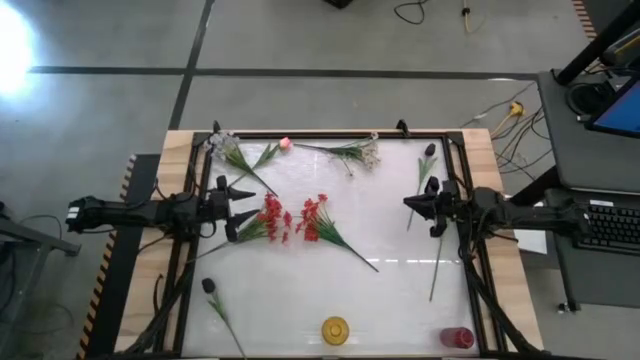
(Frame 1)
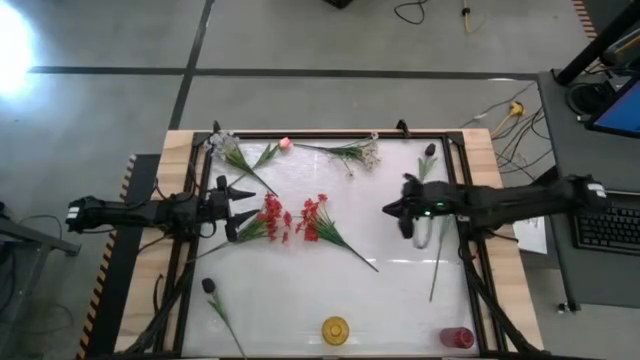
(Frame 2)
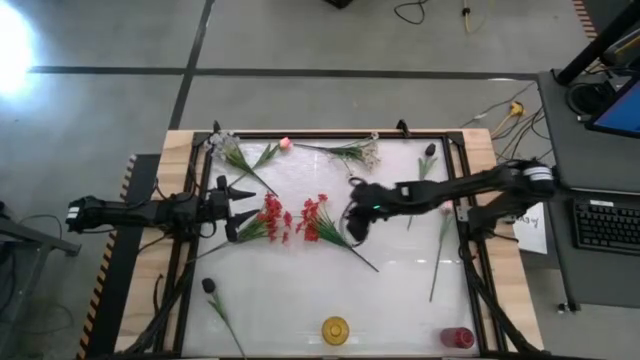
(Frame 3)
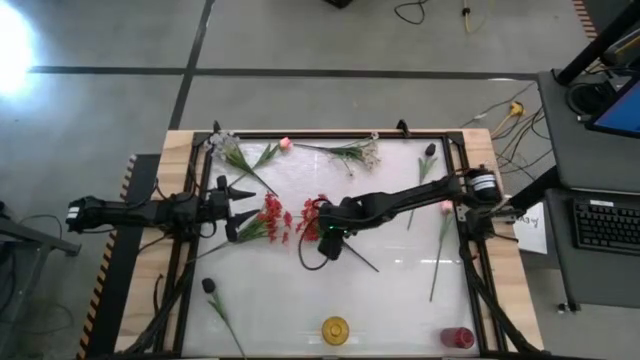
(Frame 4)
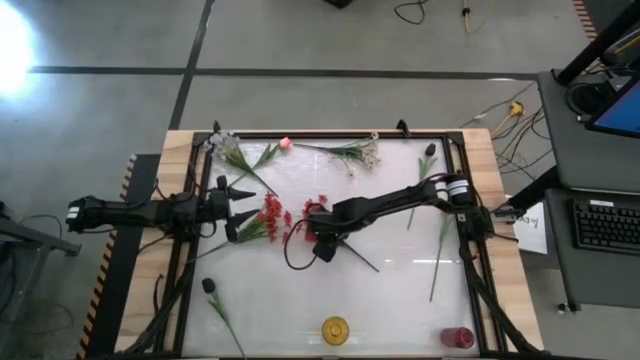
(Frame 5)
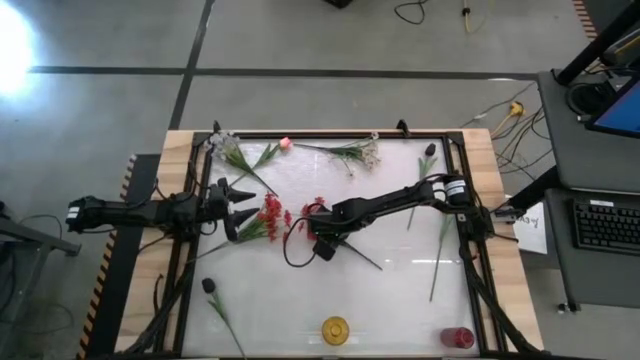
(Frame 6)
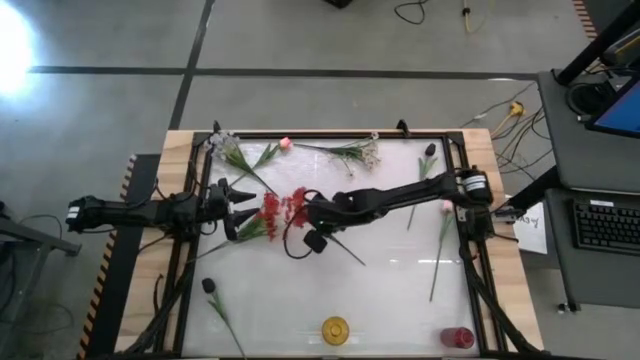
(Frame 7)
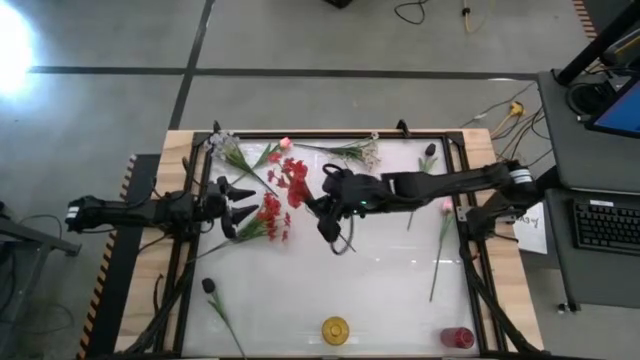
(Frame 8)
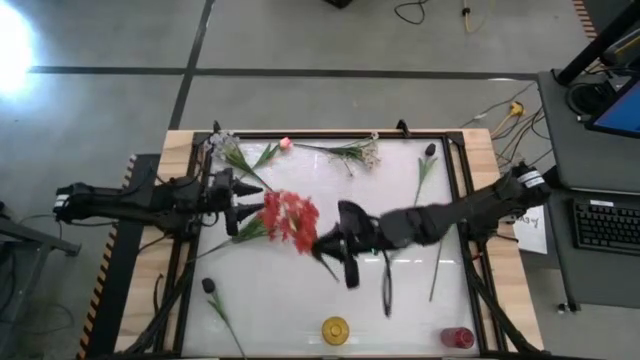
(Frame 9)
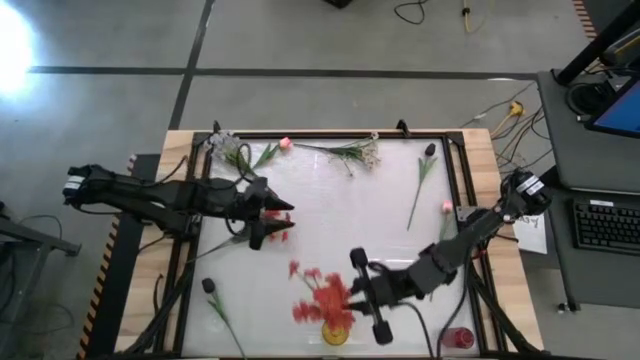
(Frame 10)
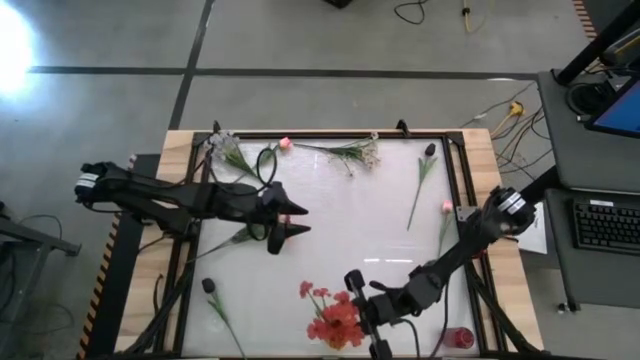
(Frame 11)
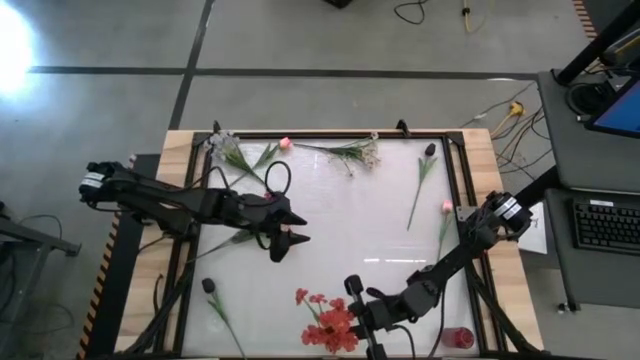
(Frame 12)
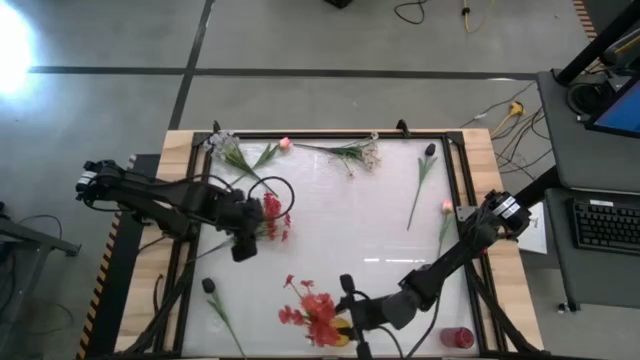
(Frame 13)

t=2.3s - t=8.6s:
Task: Sort flowers into vase by color
Put the right orange flowers into the yellow vase

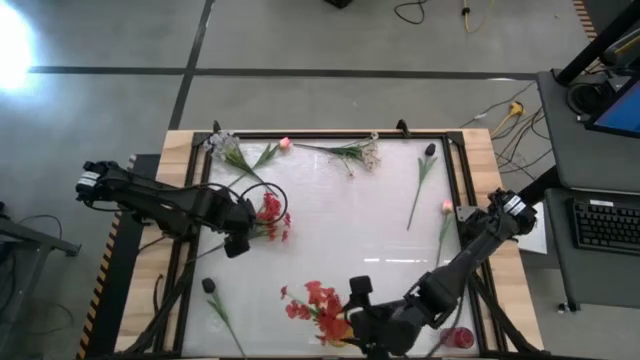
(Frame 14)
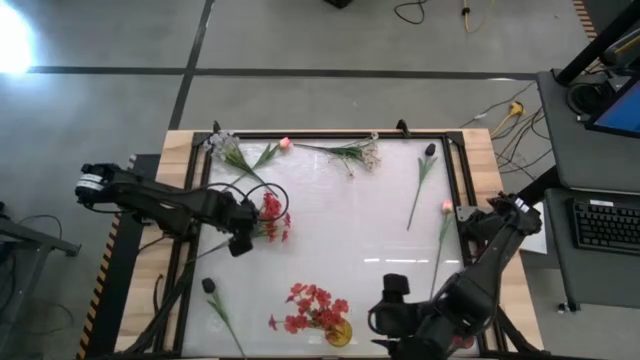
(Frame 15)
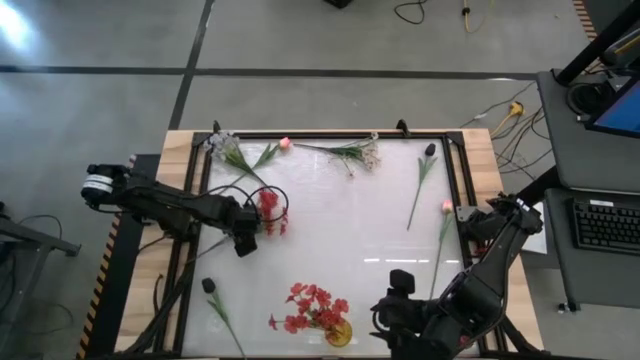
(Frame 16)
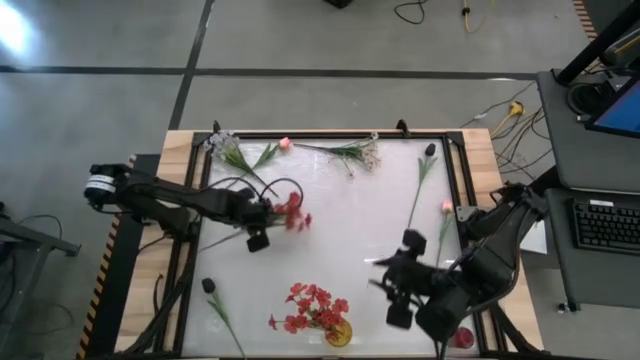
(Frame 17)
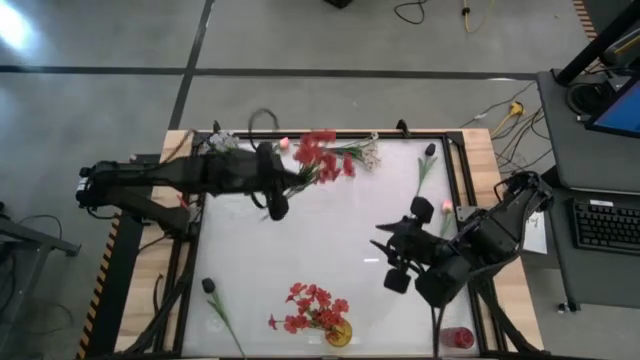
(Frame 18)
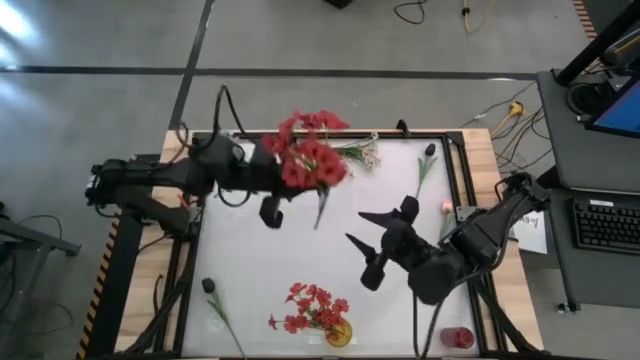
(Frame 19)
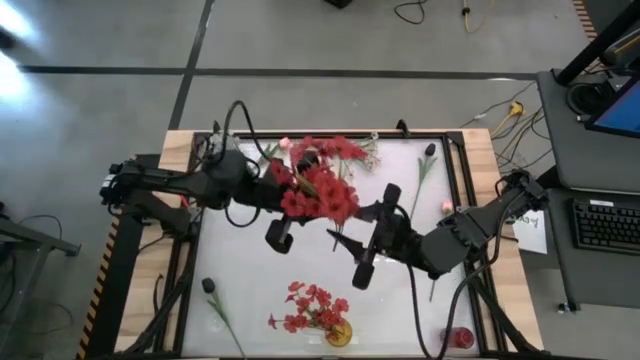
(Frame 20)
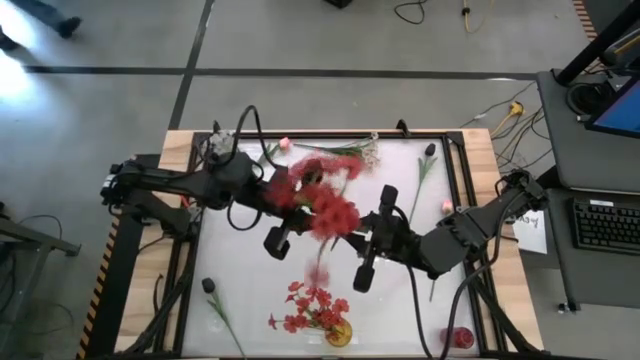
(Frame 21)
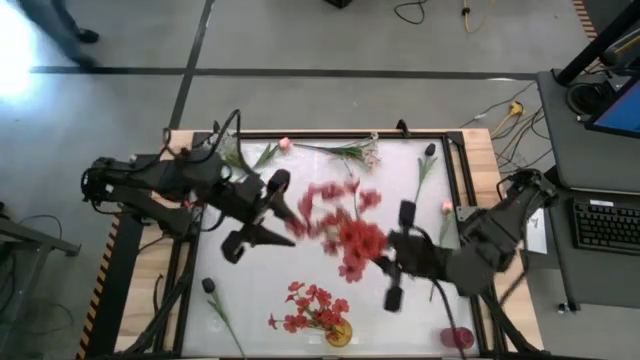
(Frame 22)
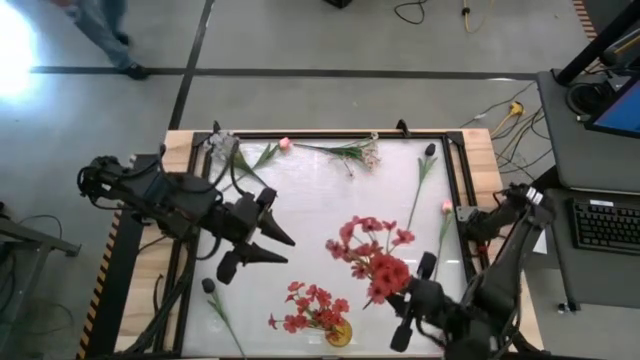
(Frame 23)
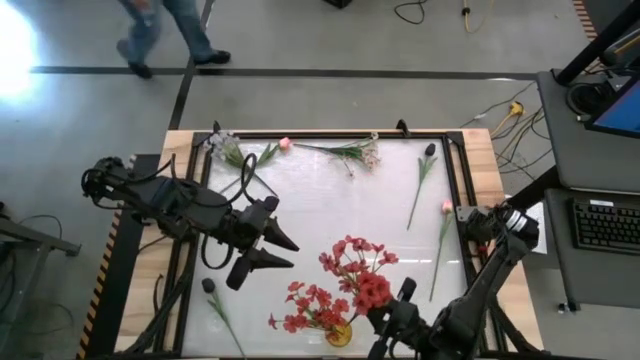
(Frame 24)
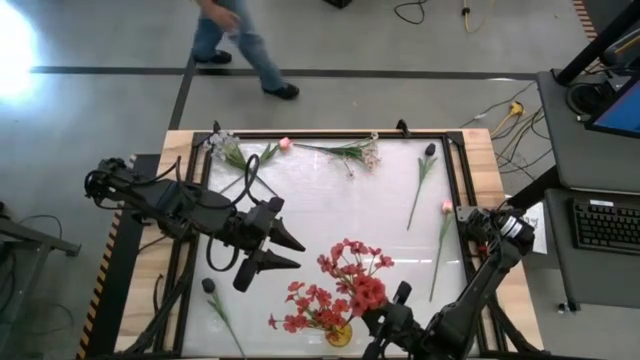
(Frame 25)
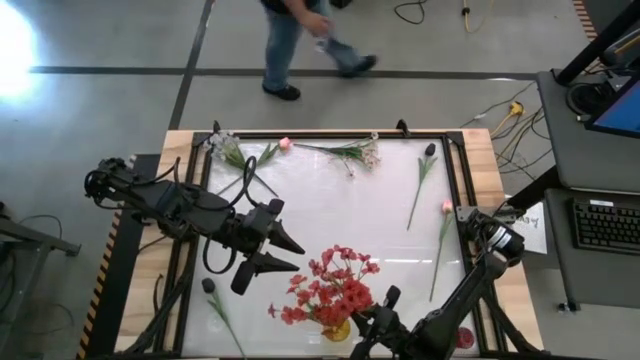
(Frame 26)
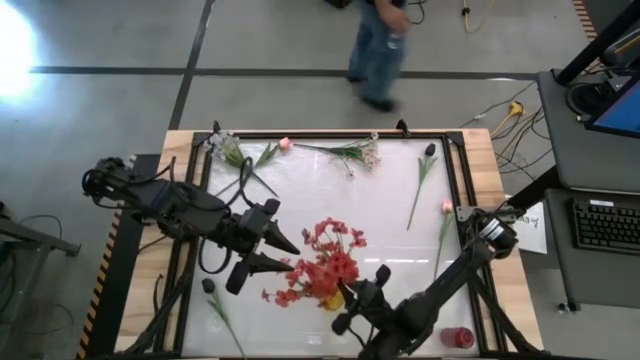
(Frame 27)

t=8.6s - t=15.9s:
Put the orange flowers into the yellow vase

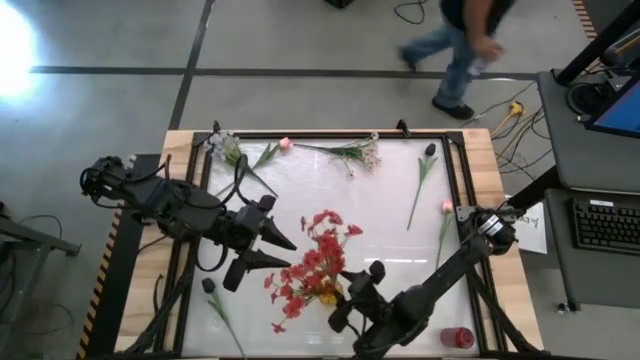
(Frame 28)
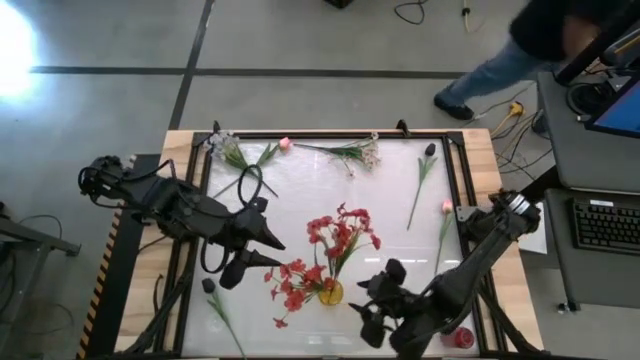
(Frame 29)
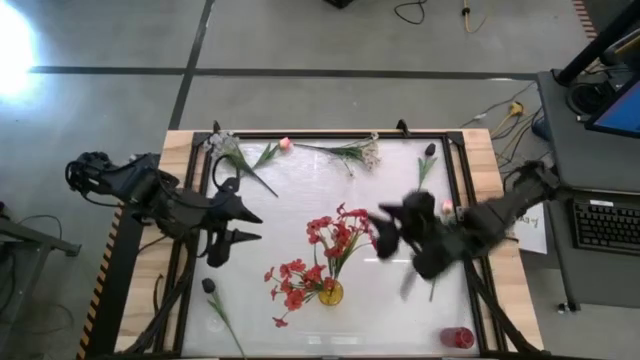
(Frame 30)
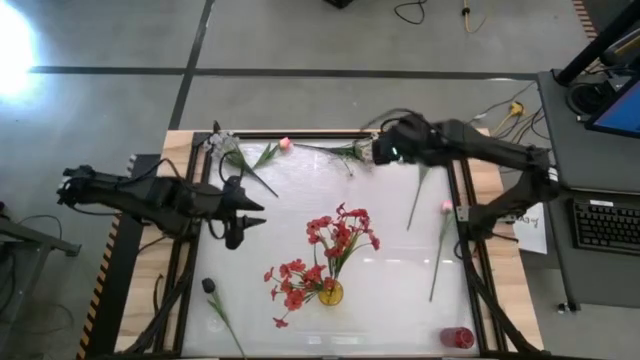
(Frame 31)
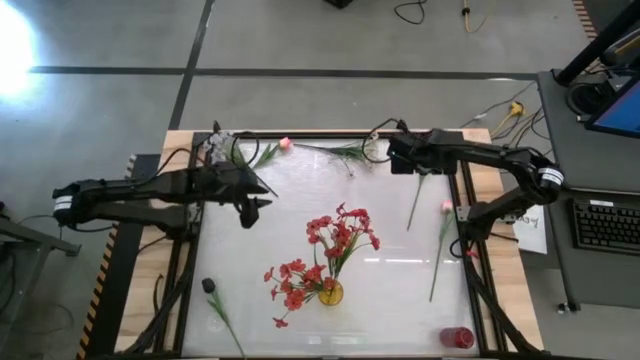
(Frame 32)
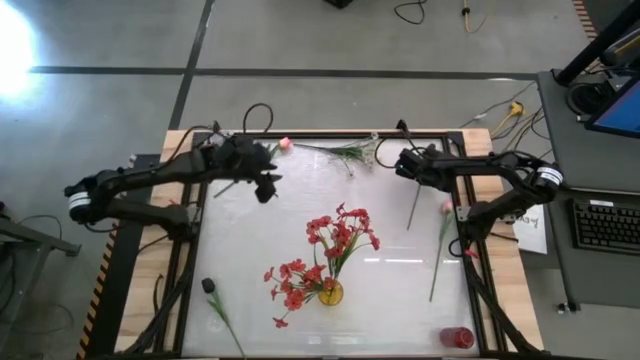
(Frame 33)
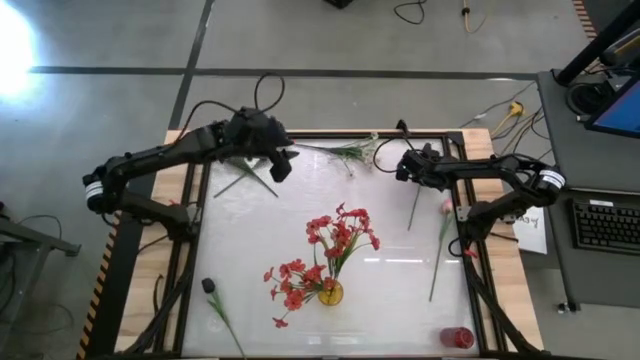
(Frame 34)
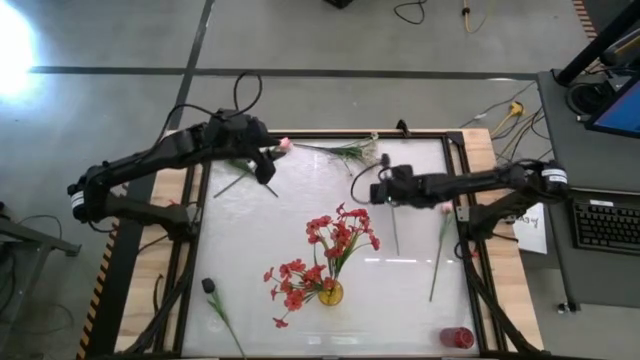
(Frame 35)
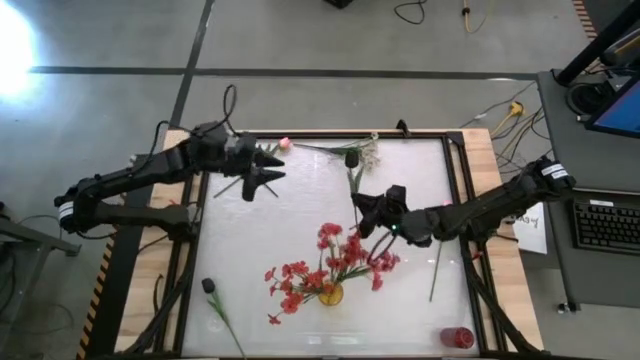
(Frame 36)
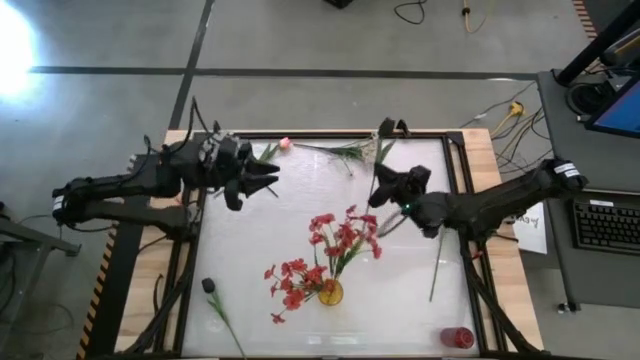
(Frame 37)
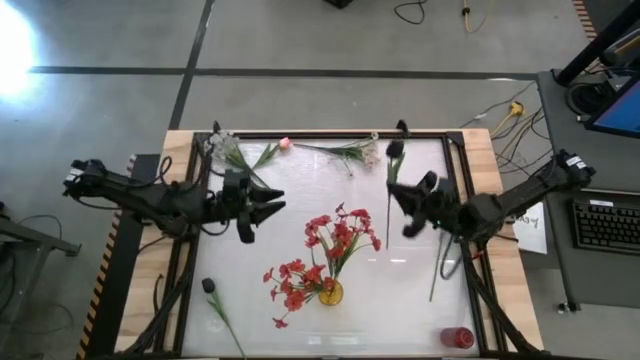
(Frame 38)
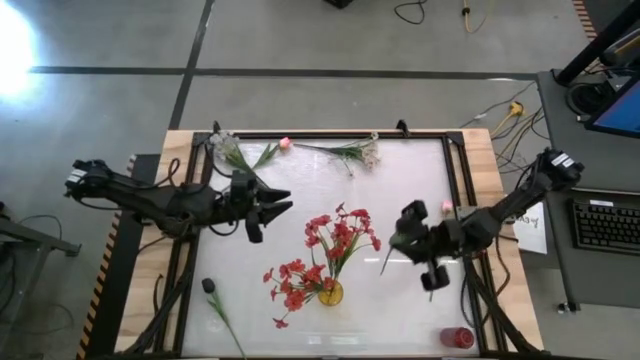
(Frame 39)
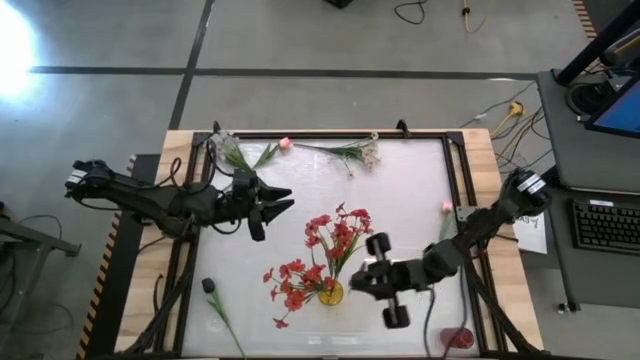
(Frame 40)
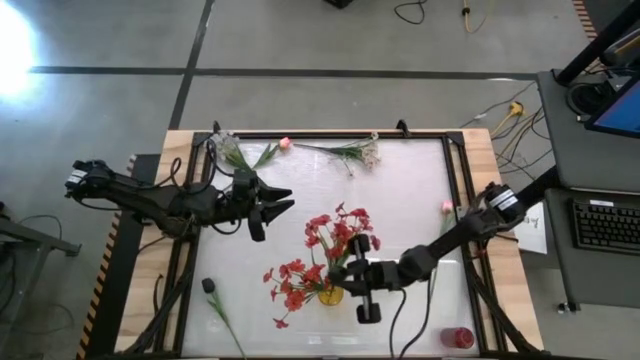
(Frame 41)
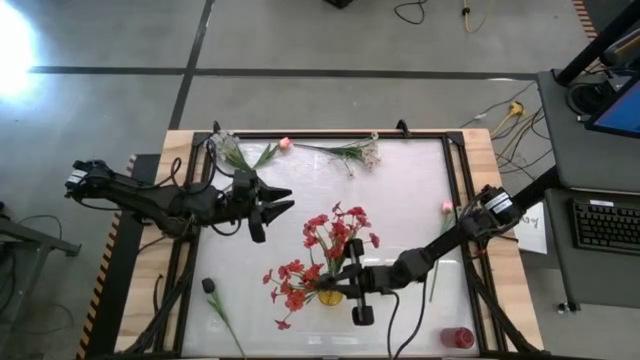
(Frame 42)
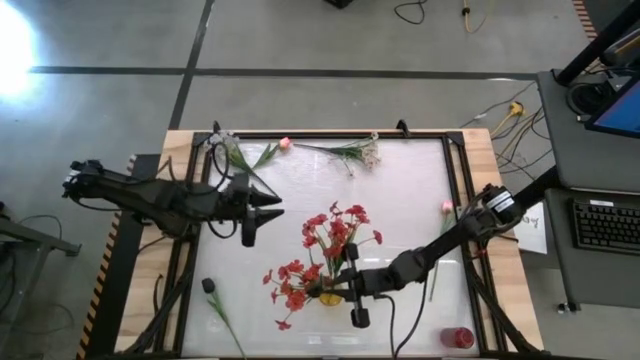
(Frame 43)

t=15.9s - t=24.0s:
Put the top black tulip into the yellow vase
